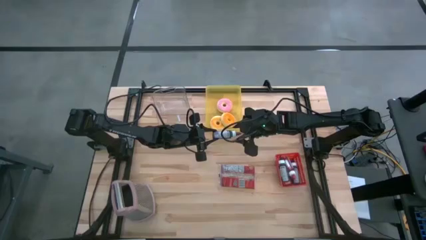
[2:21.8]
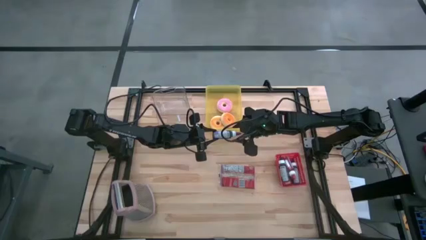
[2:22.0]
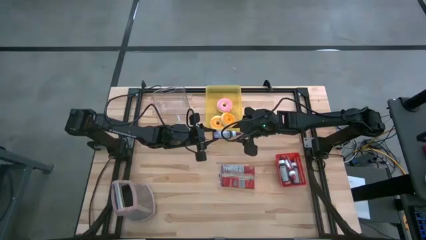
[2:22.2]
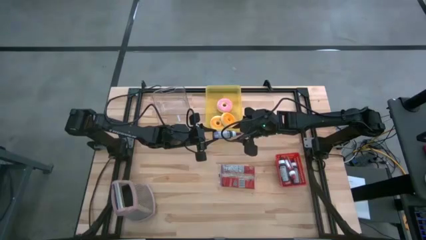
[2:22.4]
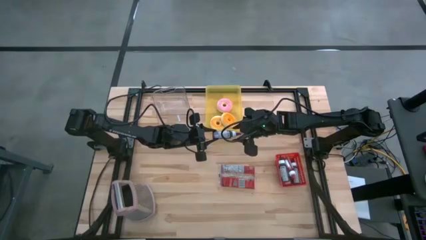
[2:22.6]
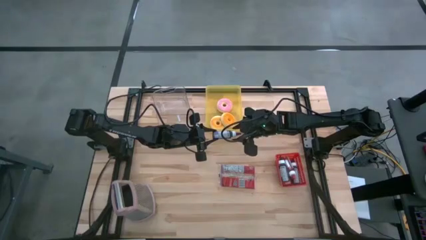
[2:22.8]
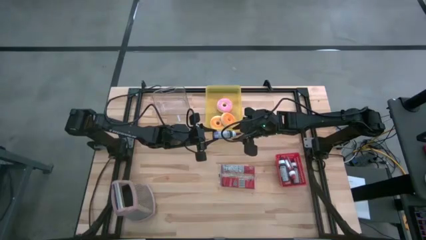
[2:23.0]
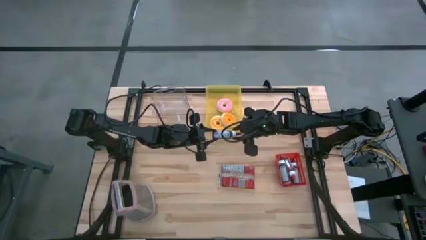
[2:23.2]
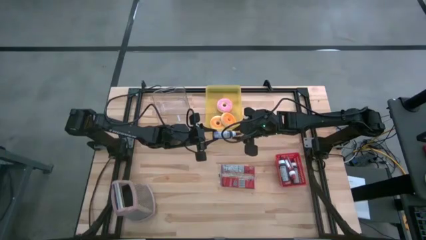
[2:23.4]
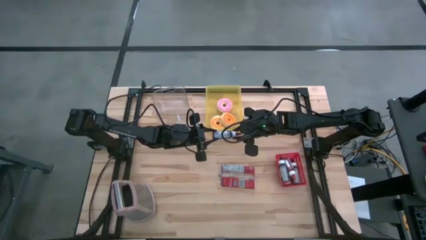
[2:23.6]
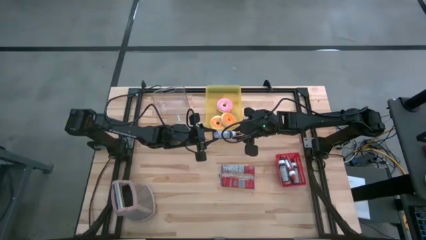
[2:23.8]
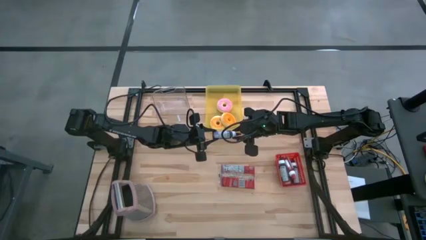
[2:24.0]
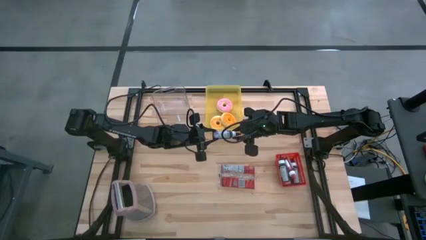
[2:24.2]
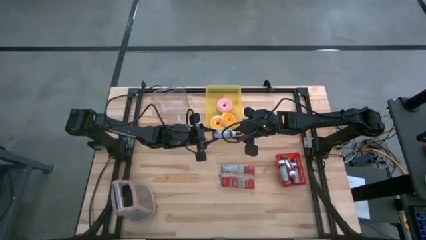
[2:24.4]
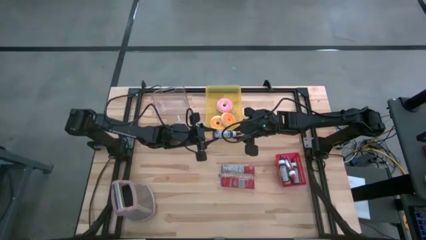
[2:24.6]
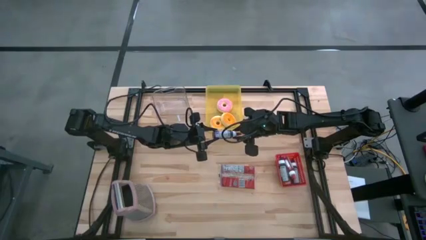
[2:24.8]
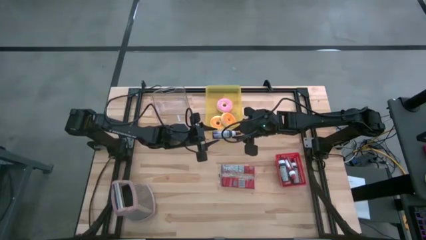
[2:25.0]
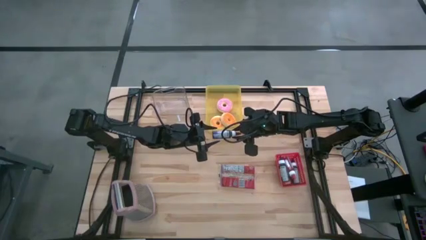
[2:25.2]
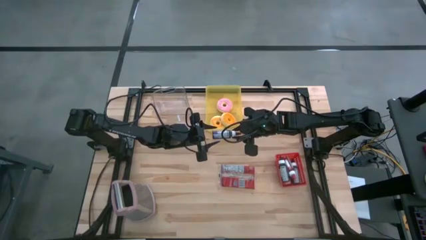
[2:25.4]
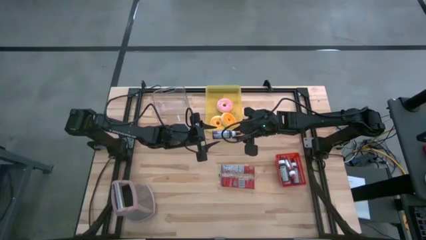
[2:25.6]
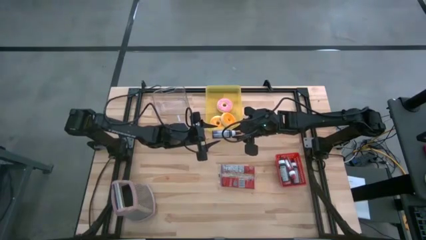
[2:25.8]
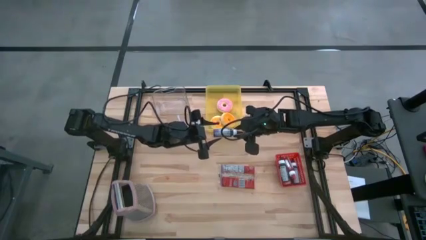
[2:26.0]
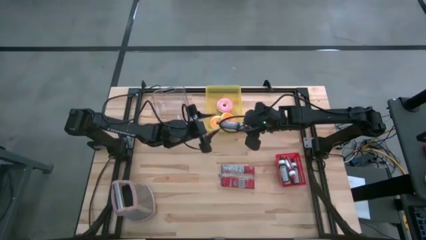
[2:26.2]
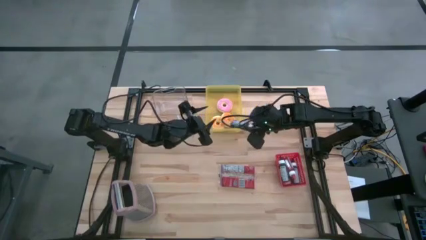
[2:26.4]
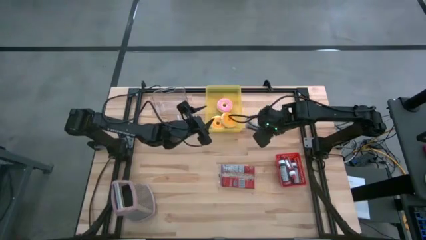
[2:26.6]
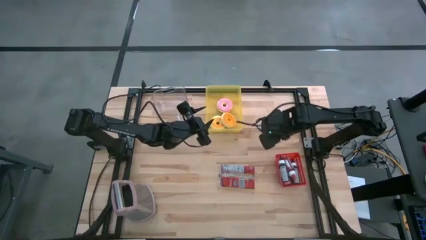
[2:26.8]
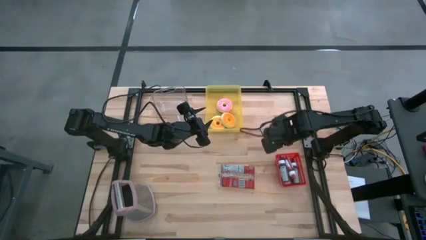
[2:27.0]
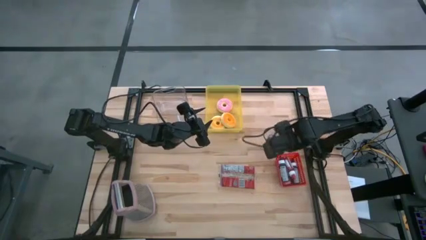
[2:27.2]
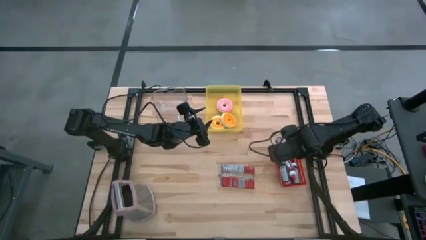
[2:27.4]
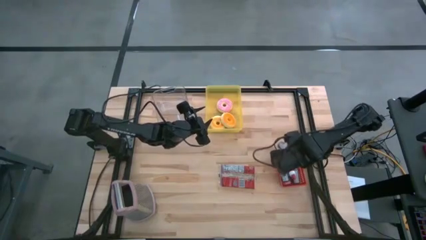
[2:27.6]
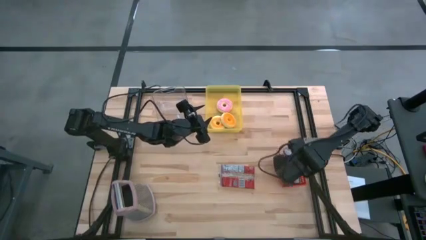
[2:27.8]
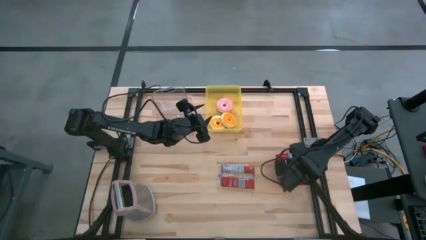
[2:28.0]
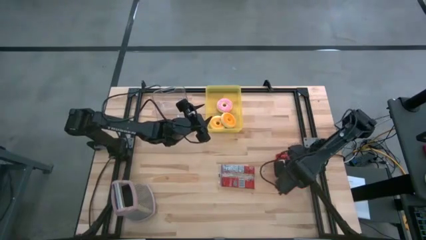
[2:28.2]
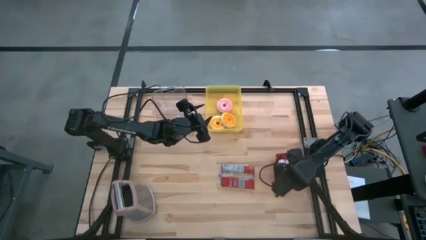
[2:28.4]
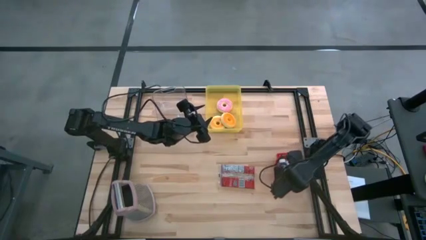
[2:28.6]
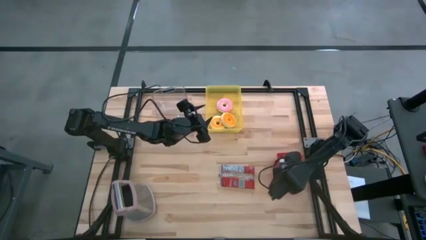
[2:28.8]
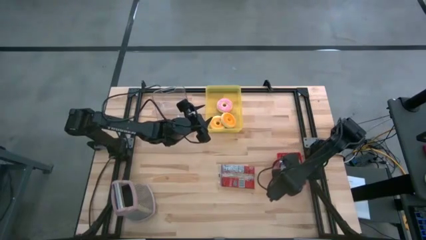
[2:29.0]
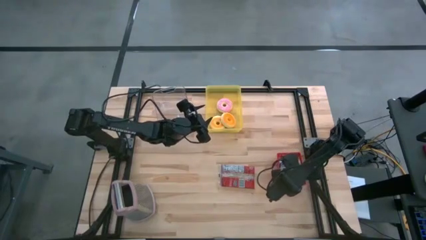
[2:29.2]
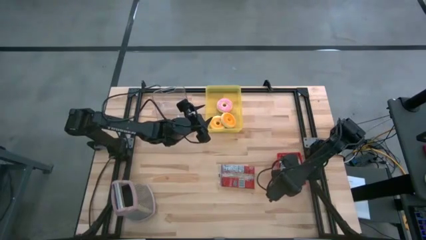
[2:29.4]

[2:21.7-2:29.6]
Task: Pick & Place Food Item
Put the violet food coloring bottle into the red bin

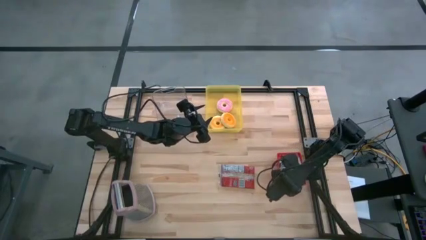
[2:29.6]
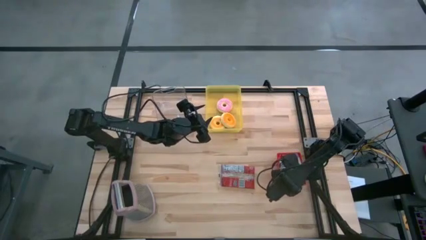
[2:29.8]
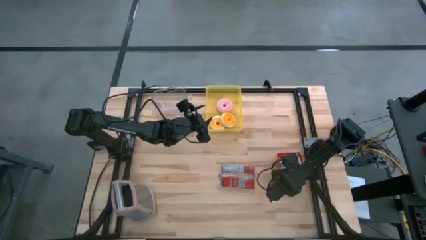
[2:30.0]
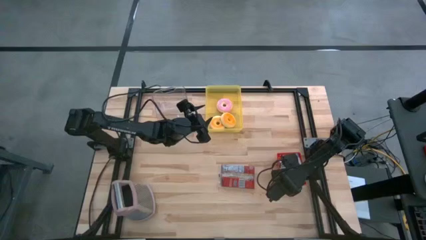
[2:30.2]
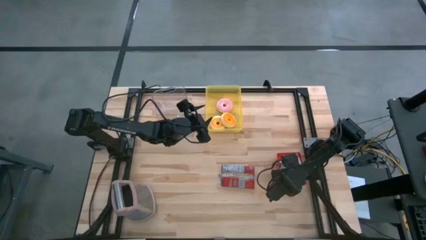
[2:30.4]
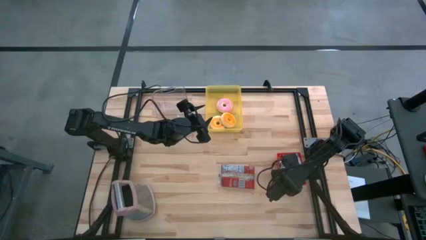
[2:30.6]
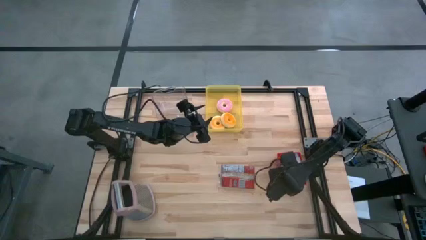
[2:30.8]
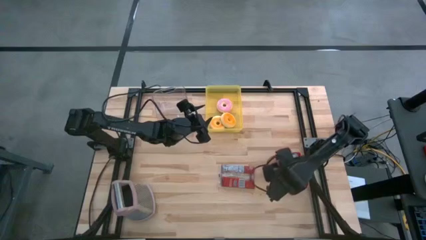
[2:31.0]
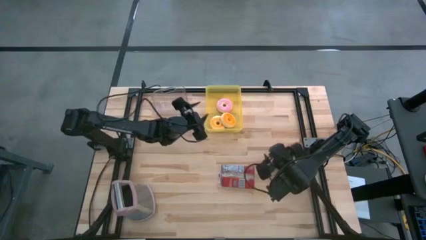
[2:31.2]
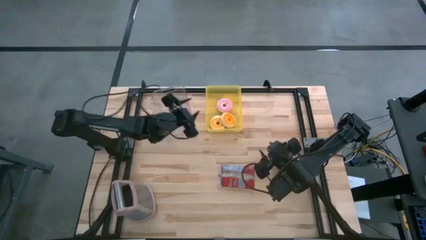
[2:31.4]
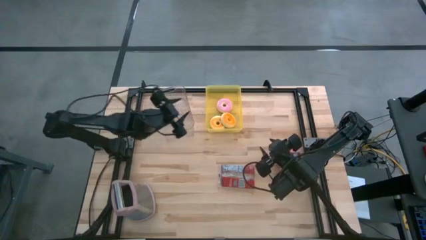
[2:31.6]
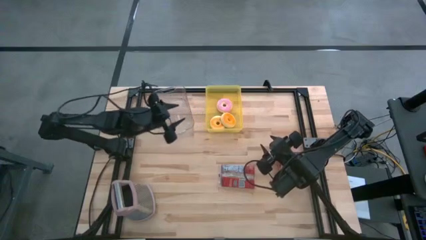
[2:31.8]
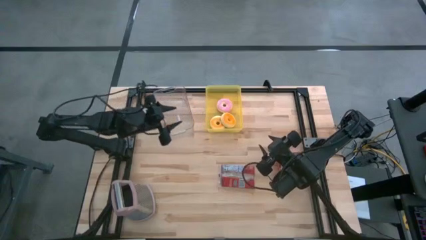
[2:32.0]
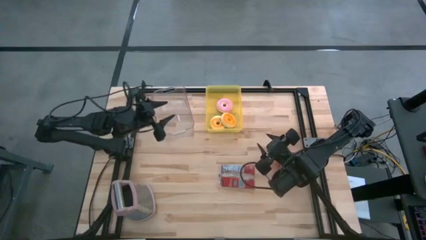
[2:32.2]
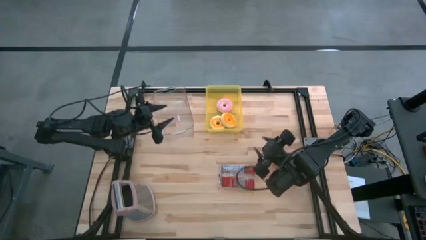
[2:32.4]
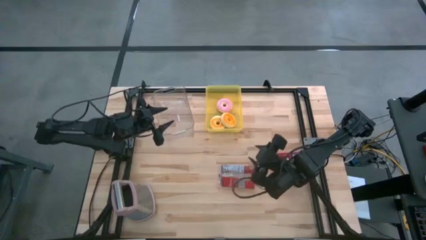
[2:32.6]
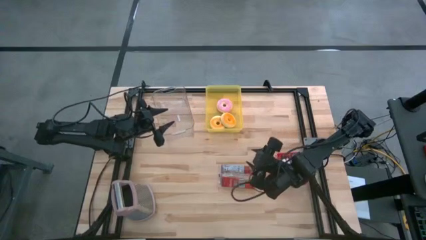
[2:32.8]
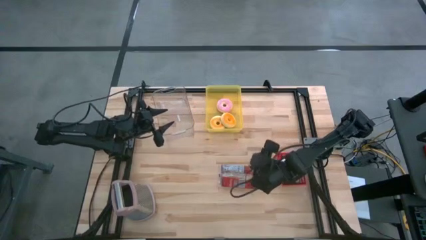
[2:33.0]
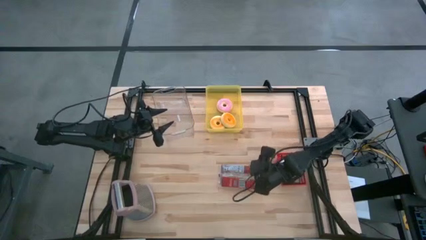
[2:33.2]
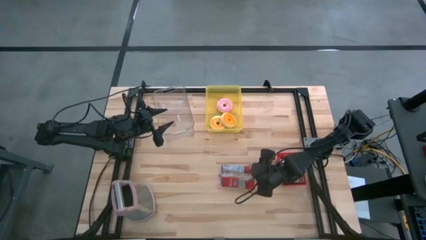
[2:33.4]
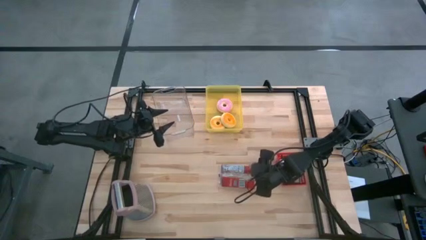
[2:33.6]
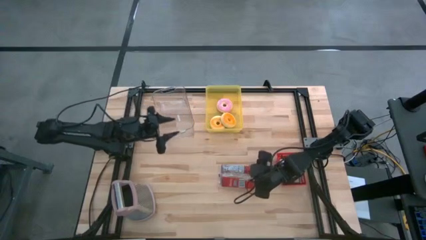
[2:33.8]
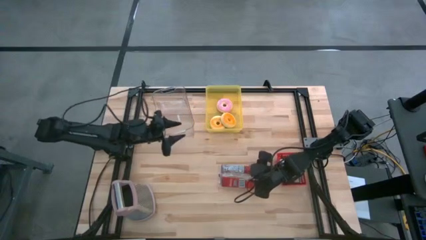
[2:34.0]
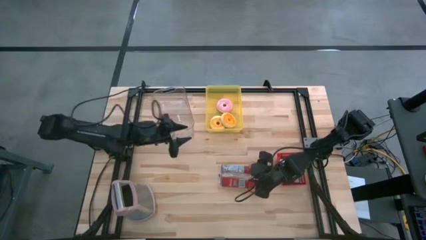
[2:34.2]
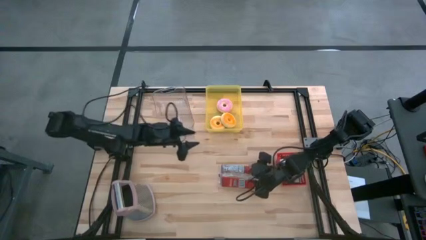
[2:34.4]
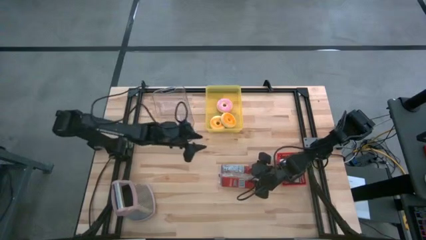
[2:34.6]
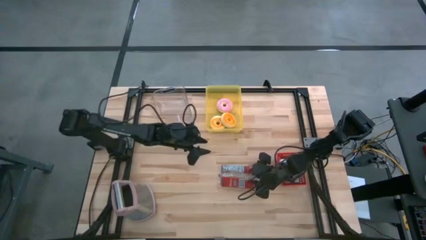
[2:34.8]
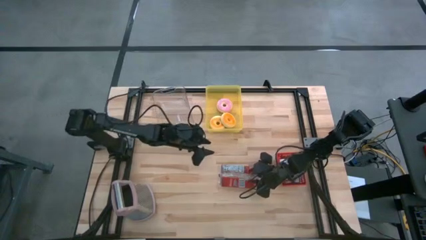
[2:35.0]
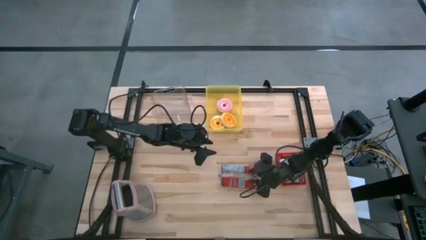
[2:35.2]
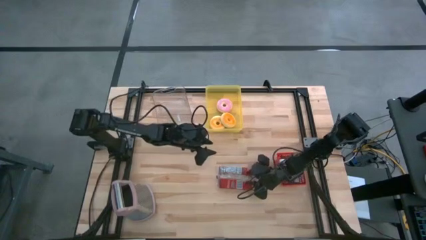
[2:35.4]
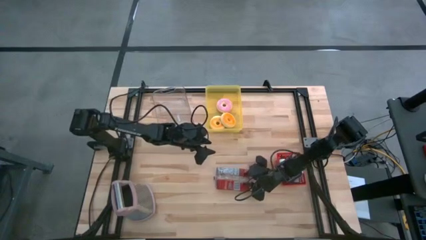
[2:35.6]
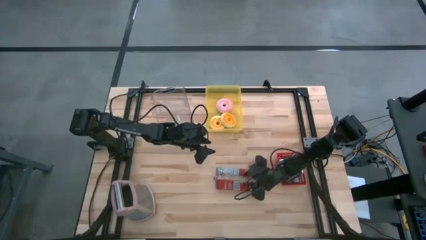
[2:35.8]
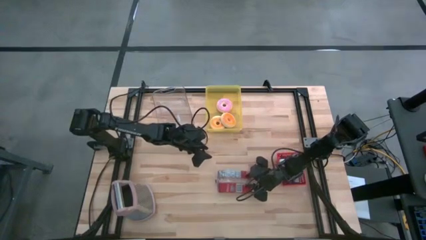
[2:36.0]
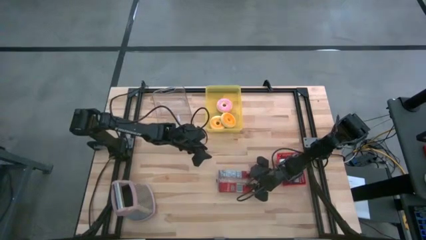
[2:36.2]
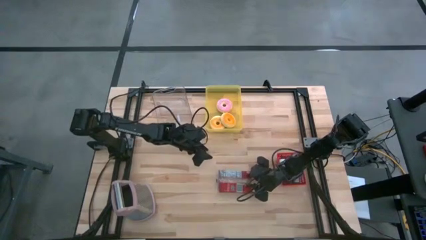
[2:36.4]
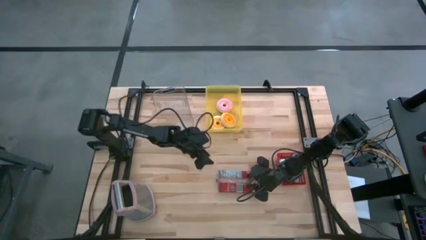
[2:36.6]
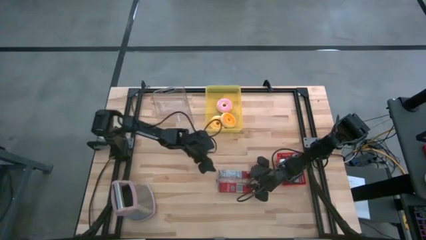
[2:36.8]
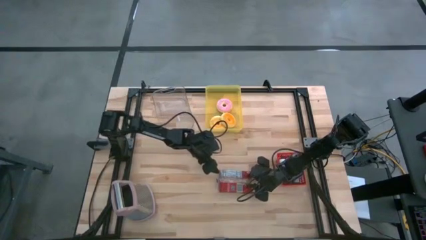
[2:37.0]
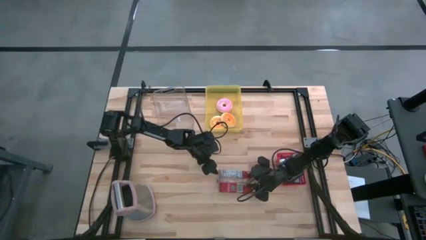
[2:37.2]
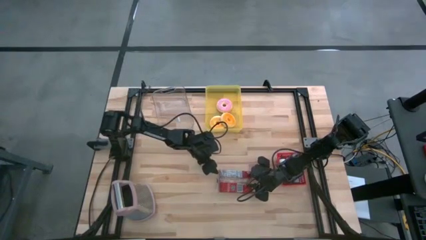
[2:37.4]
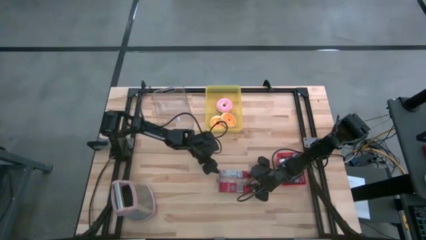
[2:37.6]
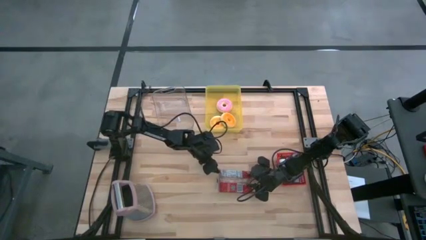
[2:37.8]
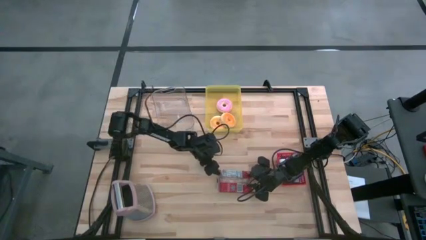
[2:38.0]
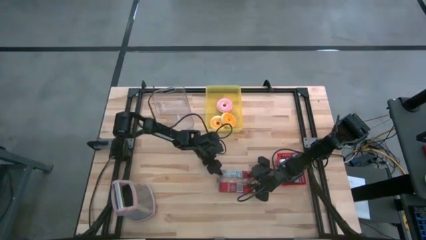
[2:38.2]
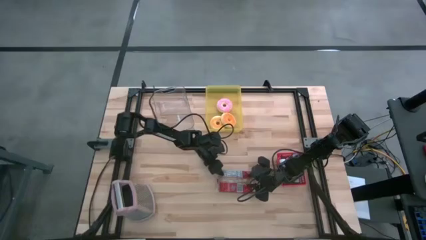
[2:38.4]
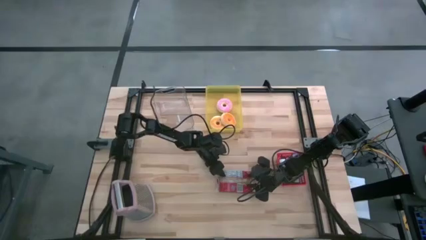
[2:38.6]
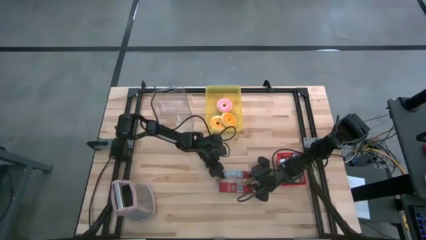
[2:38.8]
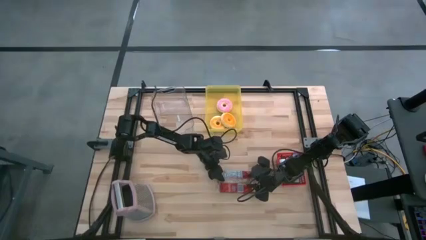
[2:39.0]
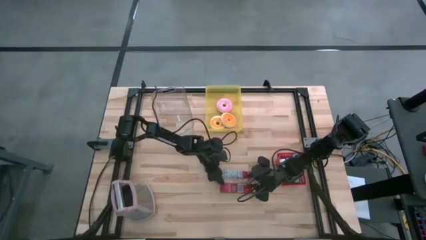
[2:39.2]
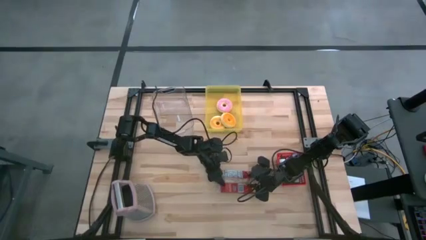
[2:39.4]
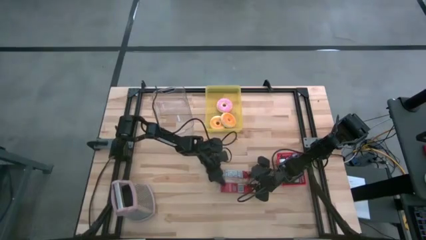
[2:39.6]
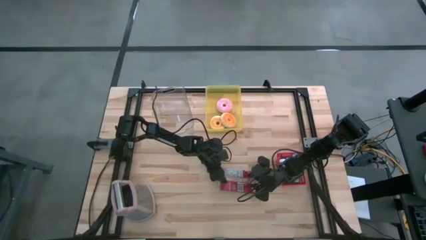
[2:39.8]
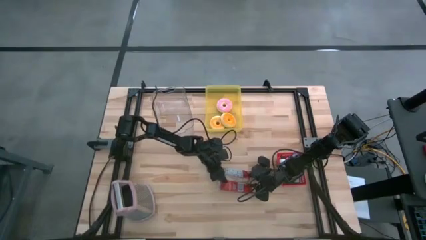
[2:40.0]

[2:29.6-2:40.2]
Put the red popcorn bag into the transparent bin
